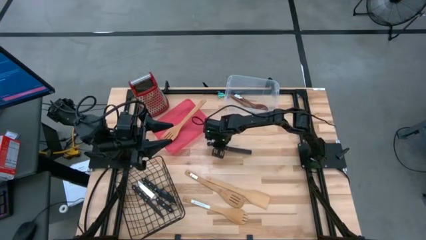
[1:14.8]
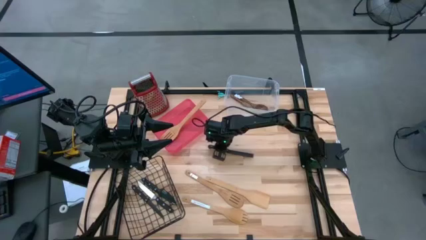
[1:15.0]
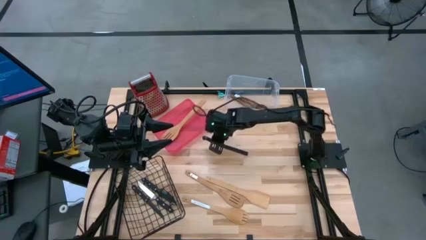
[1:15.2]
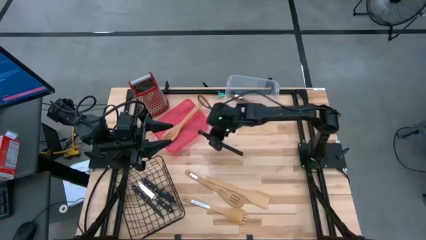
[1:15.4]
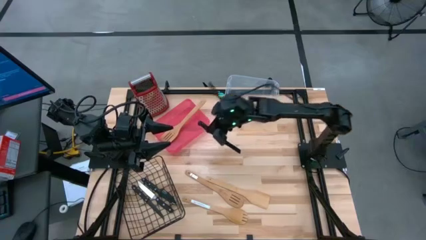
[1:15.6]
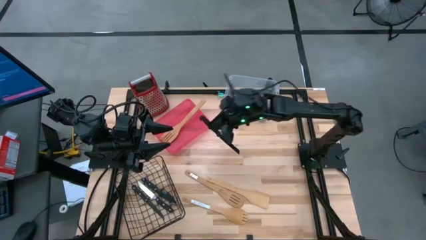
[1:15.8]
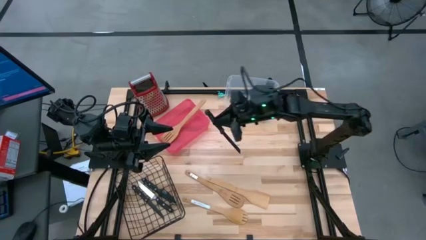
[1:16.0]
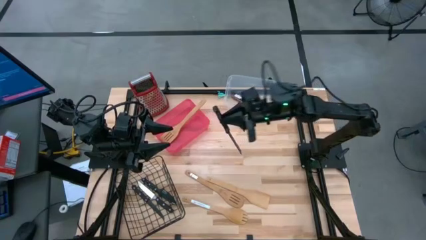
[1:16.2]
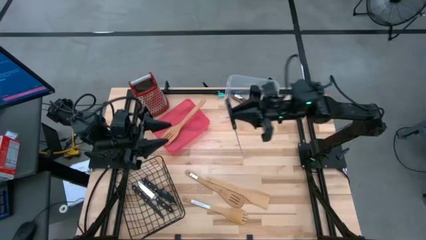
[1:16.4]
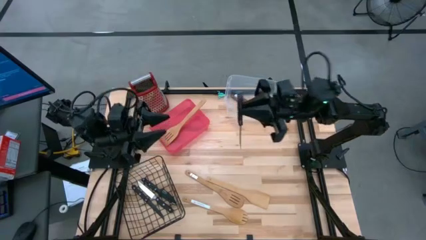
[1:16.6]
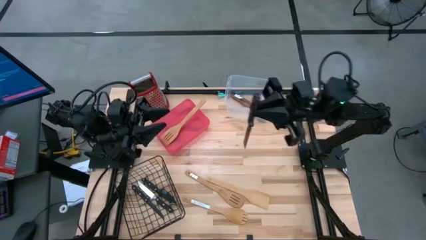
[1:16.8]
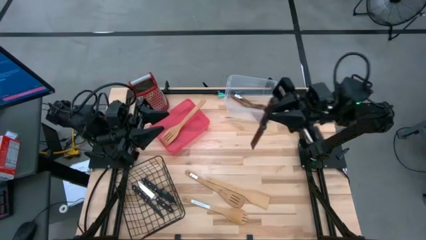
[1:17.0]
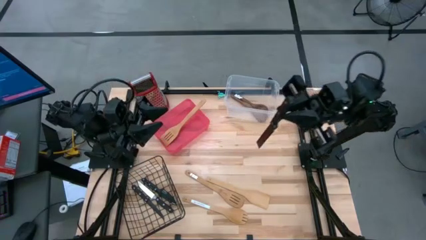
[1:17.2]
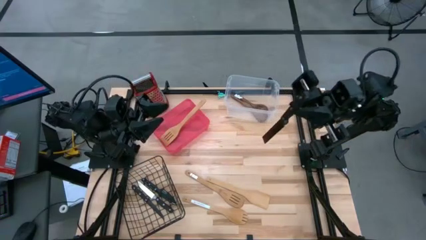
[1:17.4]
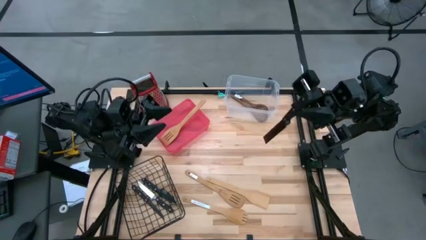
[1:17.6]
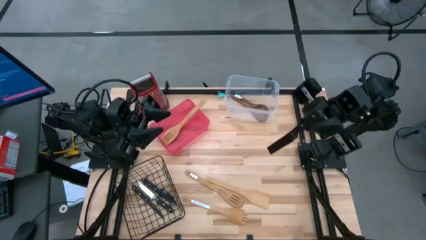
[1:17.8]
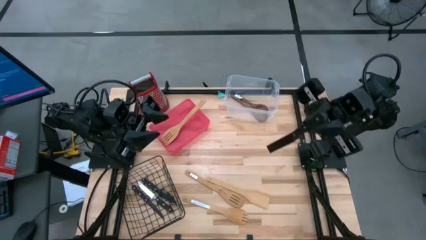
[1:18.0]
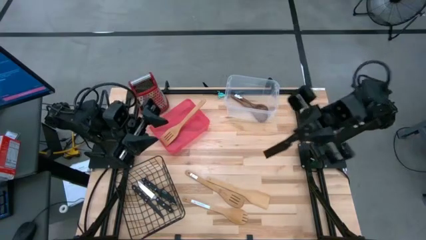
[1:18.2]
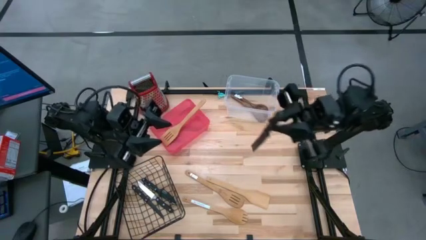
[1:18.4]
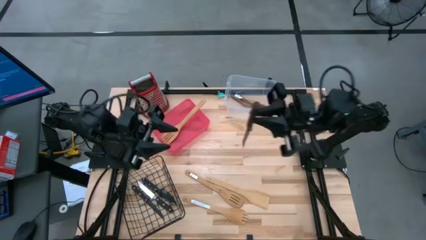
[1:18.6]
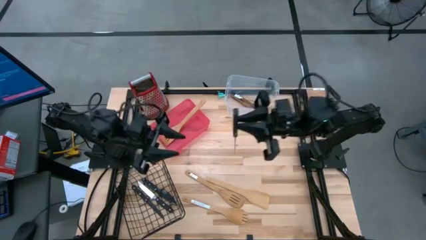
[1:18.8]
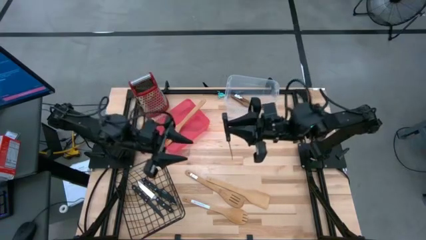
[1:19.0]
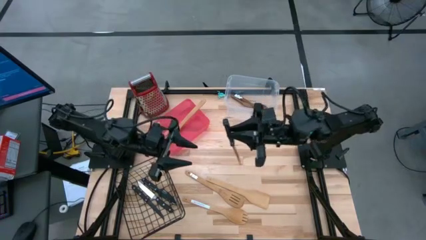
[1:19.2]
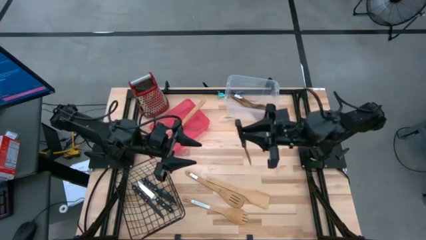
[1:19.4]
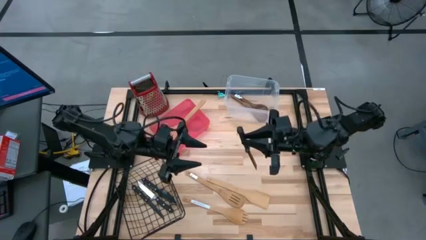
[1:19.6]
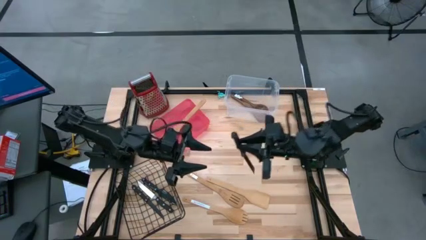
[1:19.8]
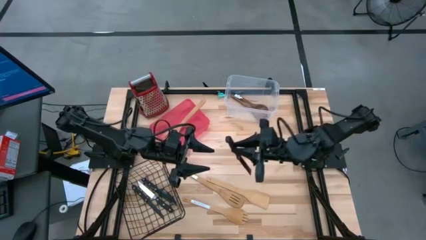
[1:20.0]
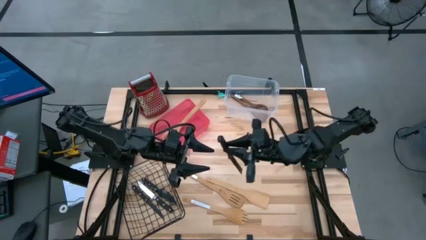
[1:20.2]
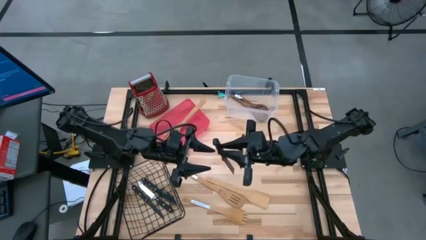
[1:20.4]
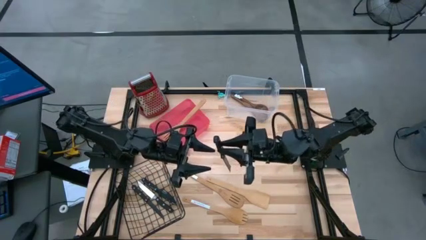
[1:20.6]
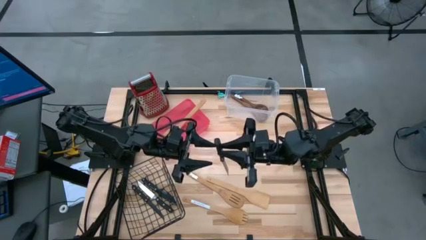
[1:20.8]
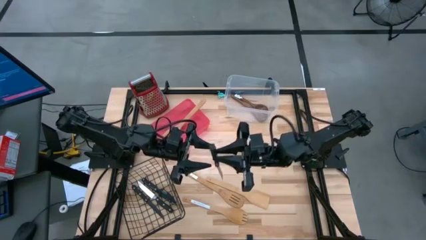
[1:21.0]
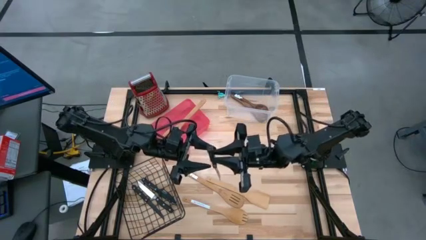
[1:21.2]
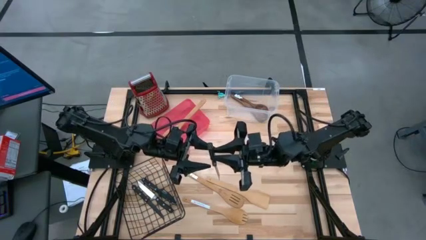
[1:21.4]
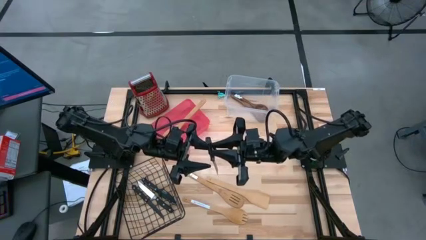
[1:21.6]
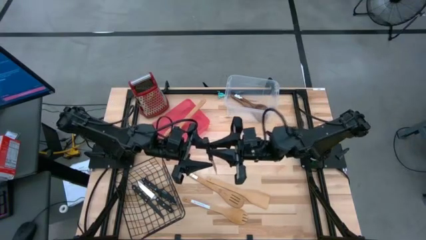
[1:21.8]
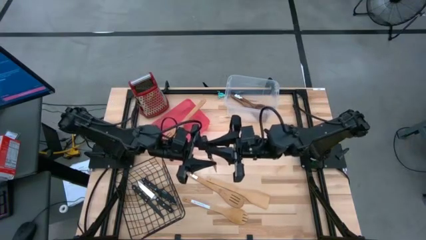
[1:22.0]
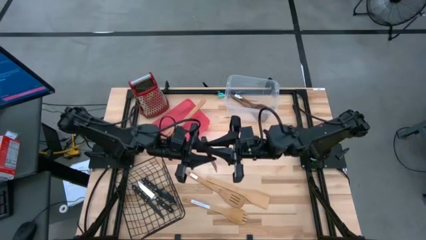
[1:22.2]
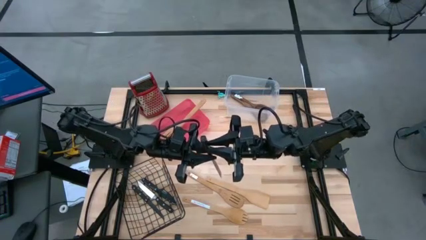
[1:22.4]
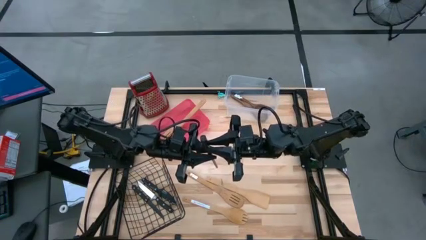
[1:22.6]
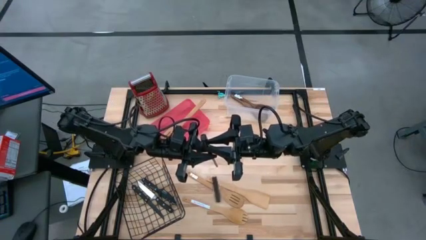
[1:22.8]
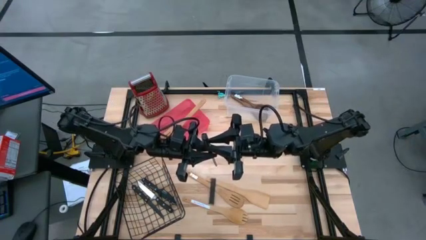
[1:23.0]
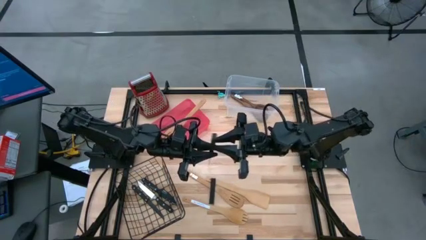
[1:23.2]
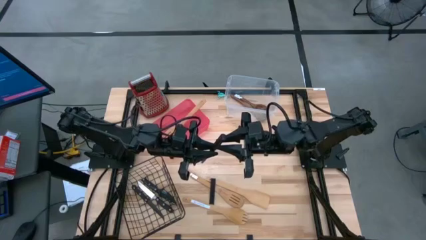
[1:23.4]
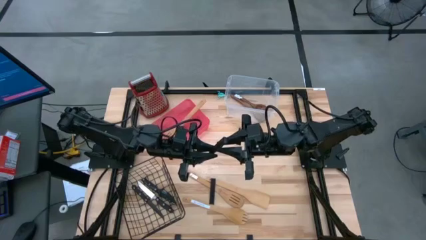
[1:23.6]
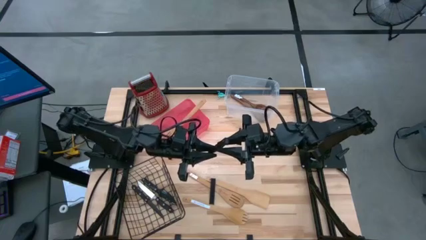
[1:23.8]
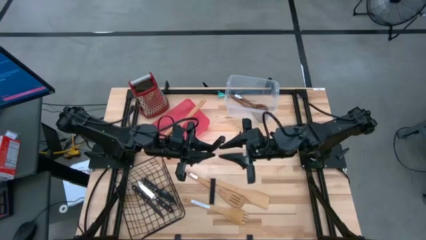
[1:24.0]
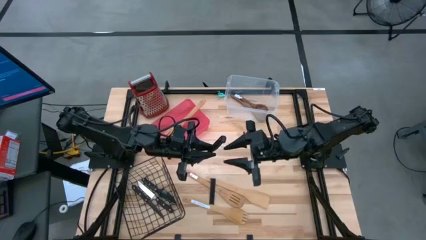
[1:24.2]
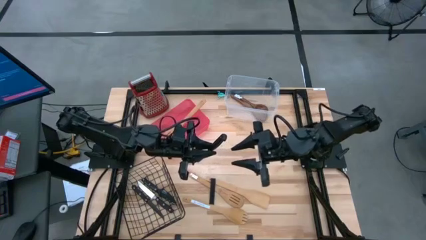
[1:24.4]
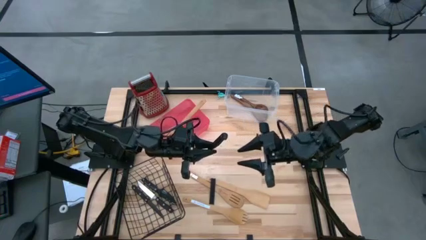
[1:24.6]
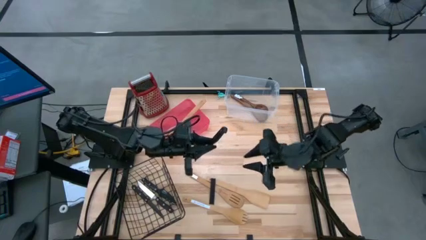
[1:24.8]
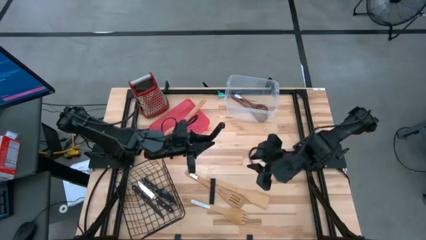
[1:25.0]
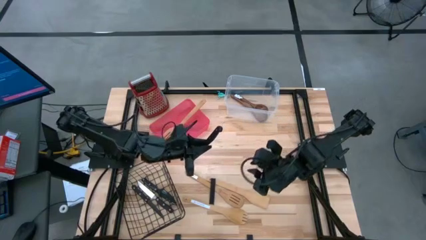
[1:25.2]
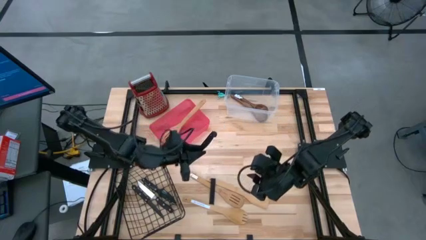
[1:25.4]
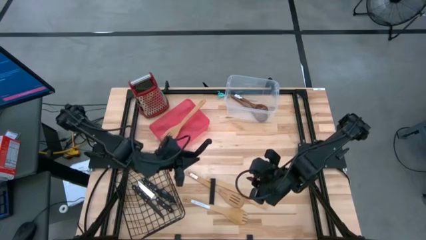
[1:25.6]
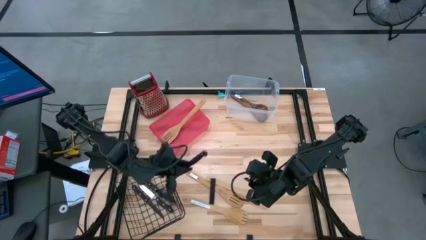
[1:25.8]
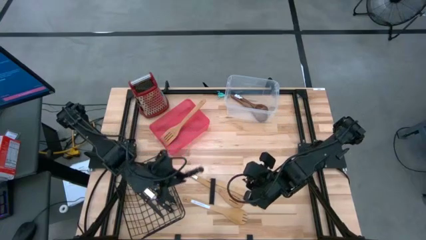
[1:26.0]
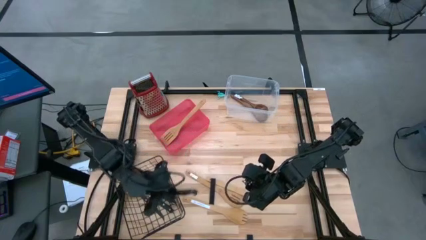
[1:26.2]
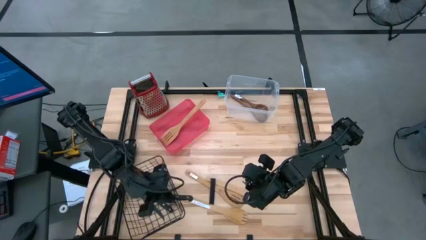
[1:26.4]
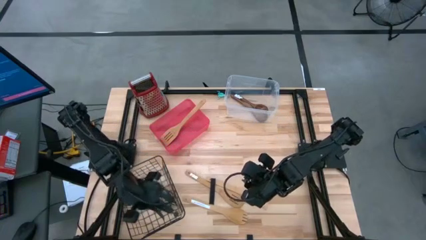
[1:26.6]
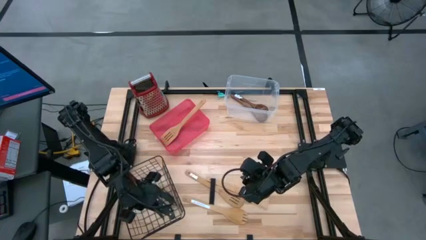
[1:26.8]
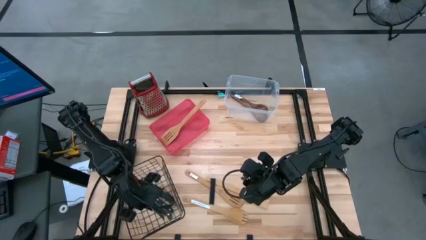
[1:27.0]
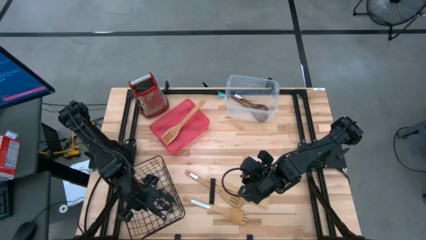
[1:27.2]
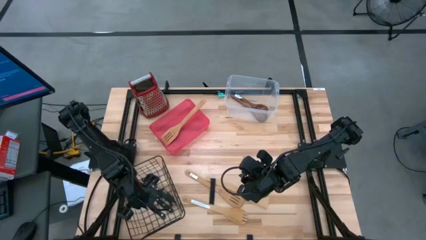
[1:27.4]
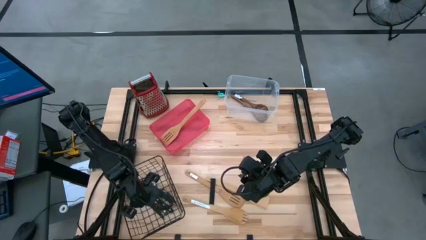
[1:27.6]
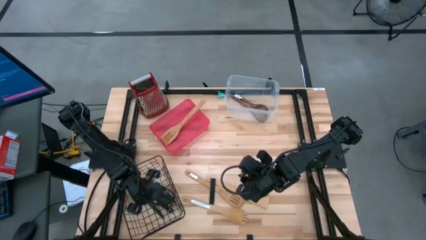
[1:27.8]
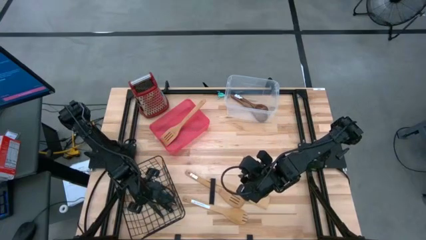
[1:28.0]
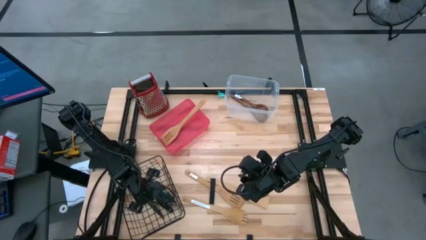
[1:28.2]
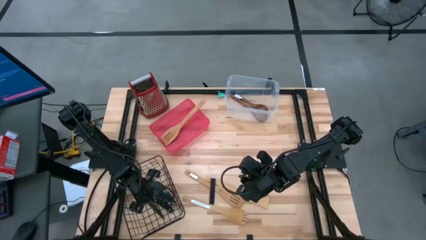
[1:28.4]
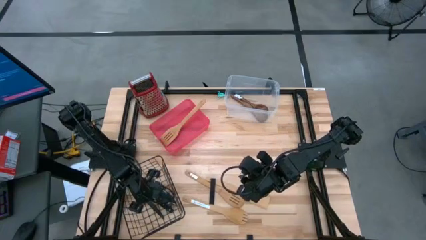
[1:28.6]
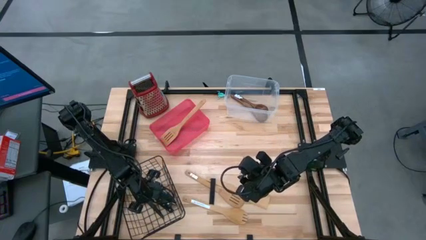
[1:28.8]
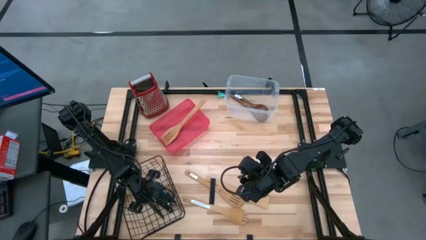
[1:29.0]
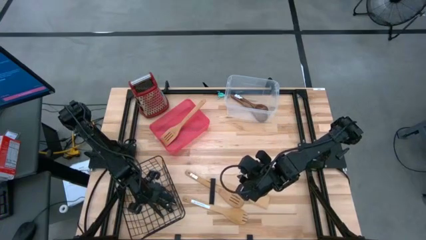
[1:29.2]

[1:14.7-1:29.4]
Task: Pick & Place Kitchen Items
Put the black kitchen knife into the wire basket

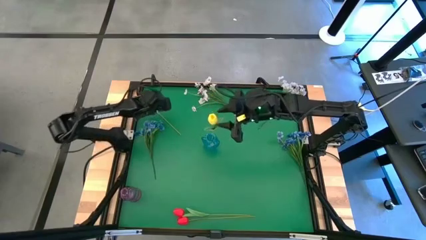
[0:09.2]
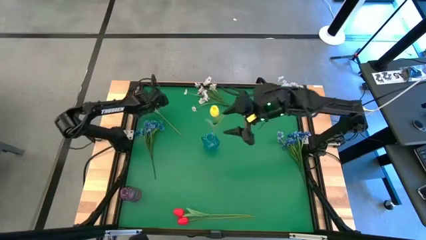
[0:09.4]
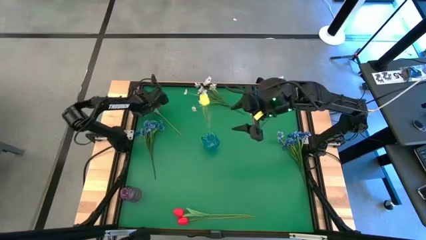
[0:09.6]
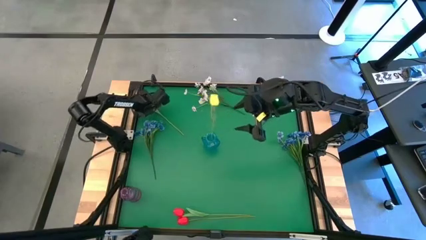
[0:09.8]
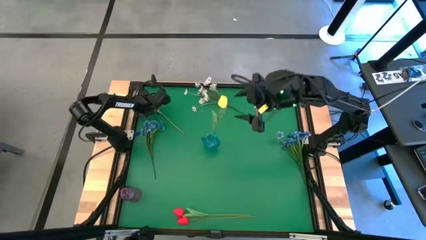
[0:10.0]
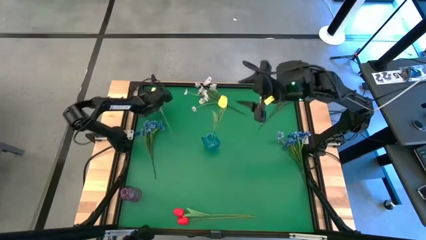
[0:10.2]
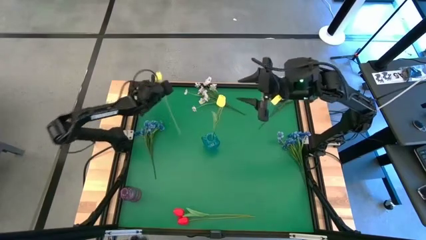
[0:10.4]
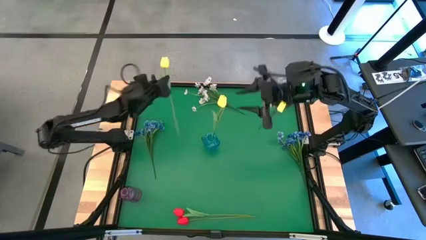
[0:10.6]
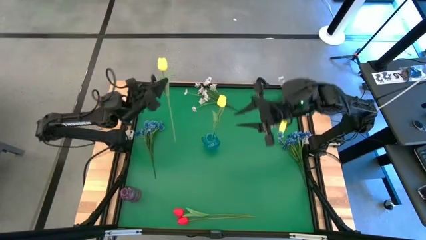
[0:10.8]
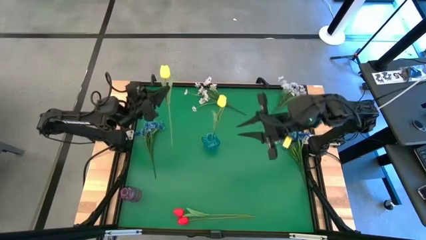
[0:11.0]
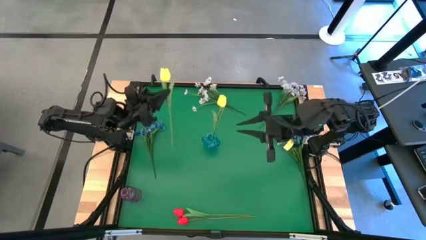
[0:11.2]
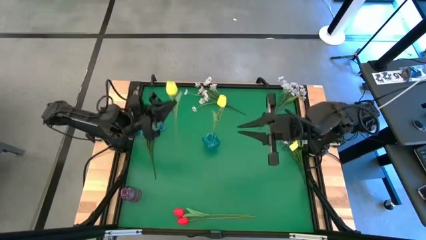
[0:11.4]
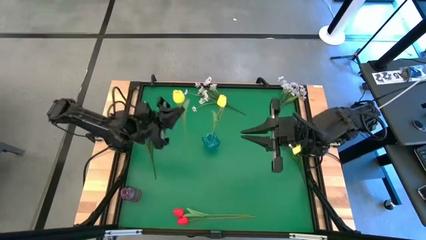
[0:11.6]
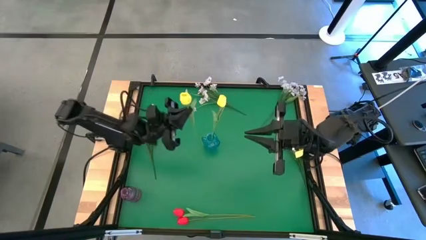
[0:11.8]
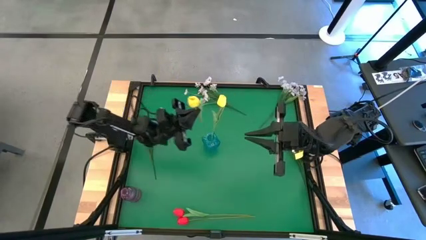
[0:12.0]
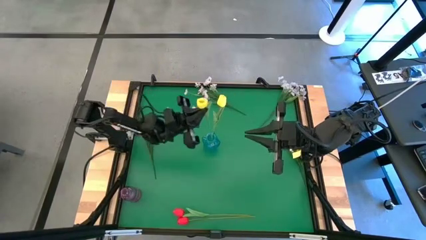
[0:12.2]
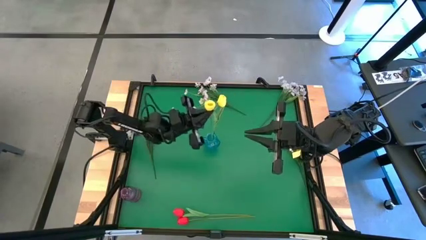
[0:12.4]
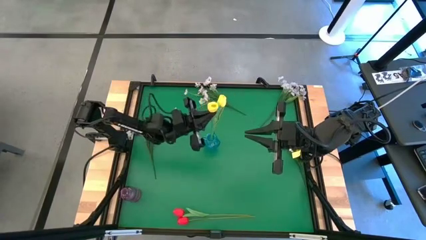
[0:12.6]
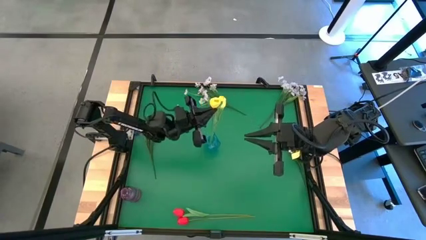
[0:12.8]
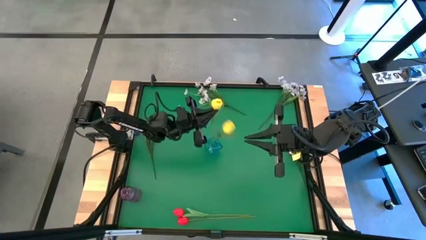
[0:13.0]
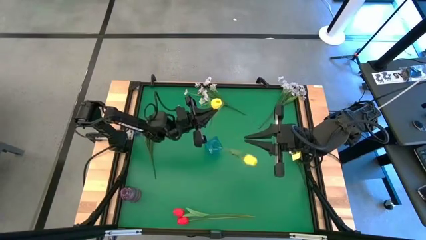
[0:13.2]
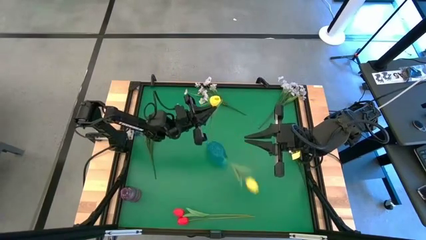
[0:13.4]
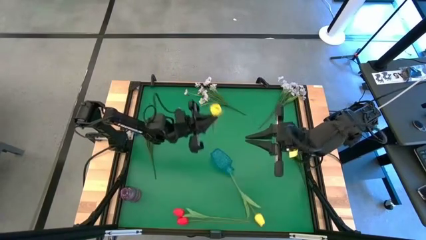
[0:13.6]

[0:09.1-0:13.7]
Task: Sort flowers into vase by color
Put the yellow tulip into the blue vase
